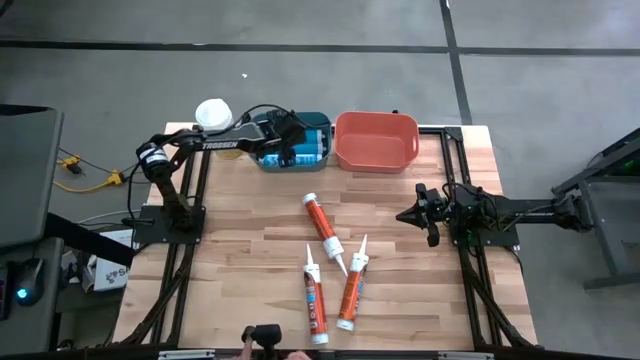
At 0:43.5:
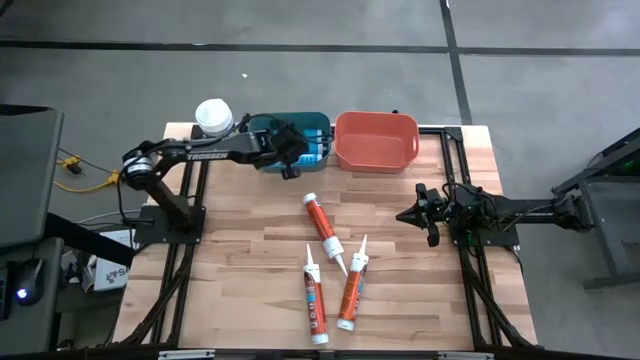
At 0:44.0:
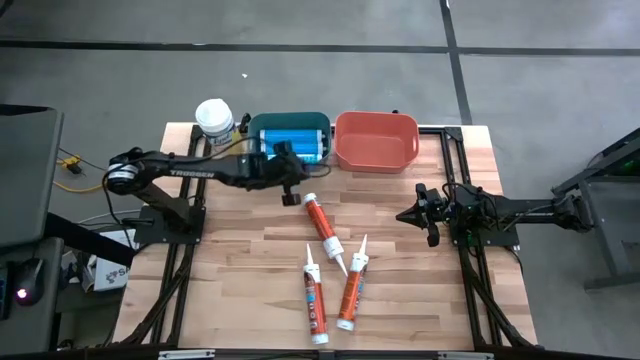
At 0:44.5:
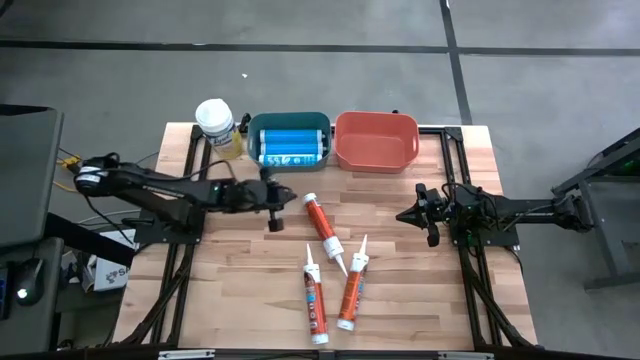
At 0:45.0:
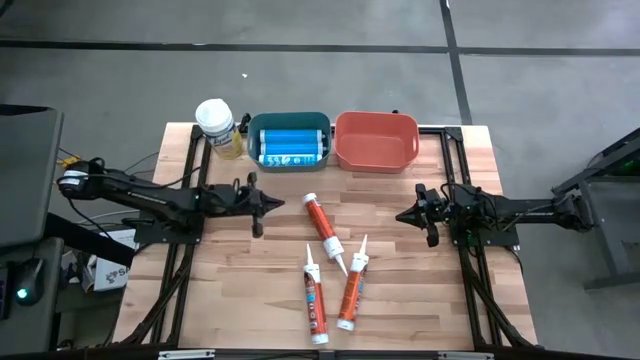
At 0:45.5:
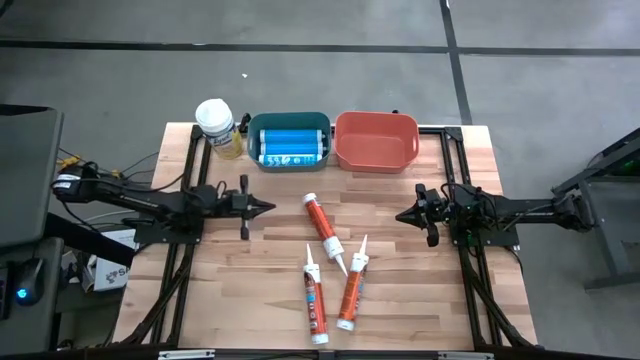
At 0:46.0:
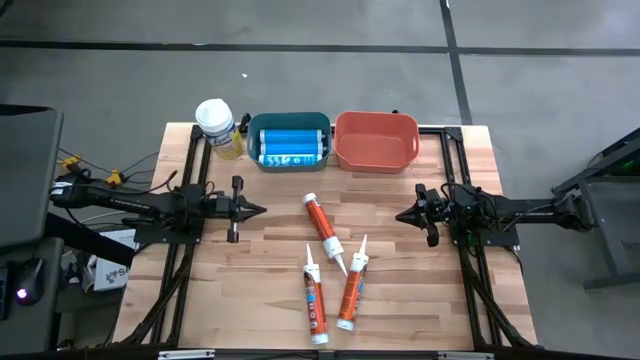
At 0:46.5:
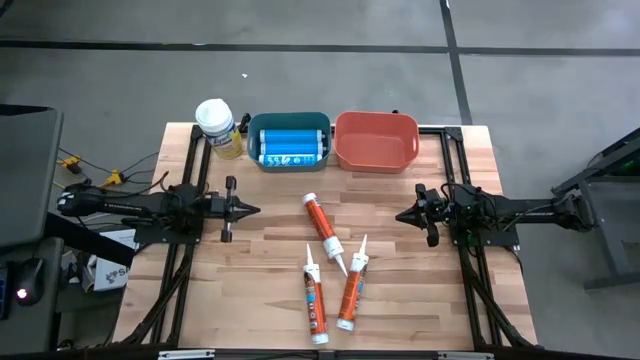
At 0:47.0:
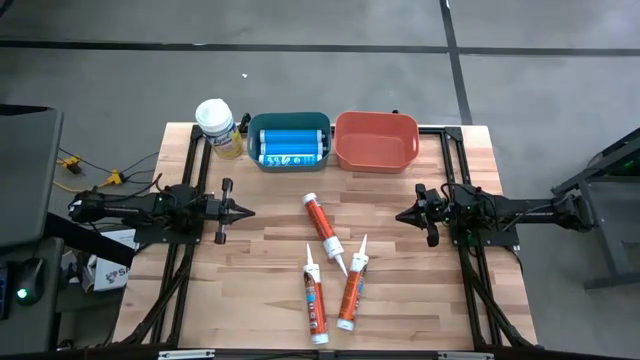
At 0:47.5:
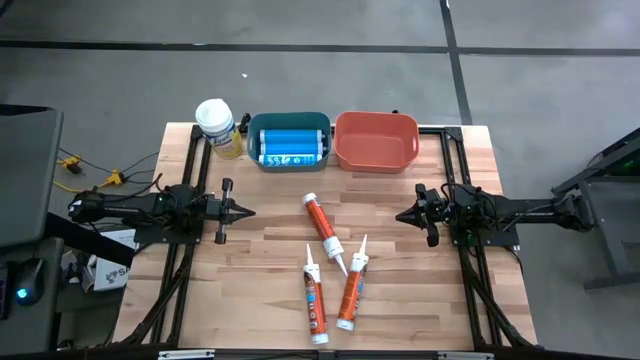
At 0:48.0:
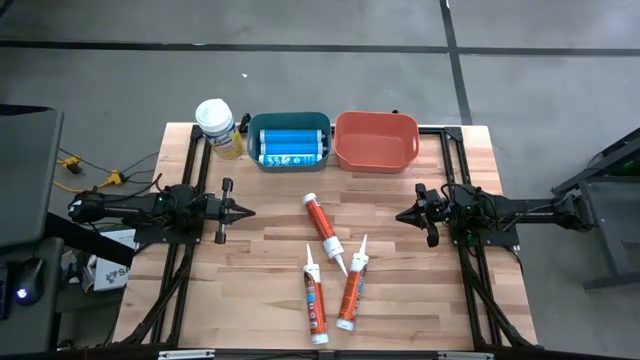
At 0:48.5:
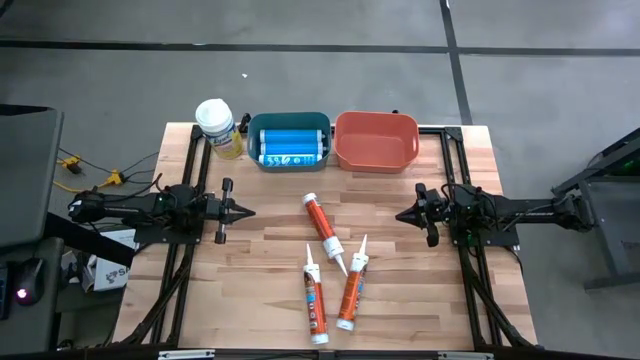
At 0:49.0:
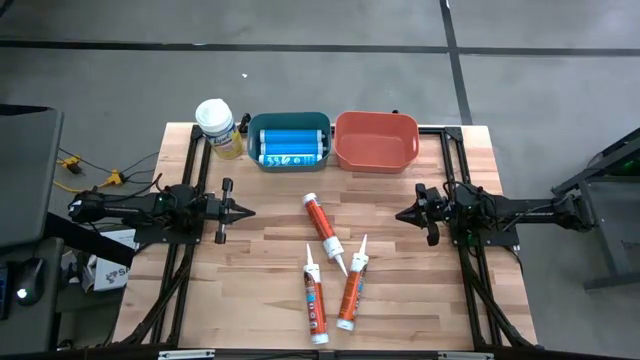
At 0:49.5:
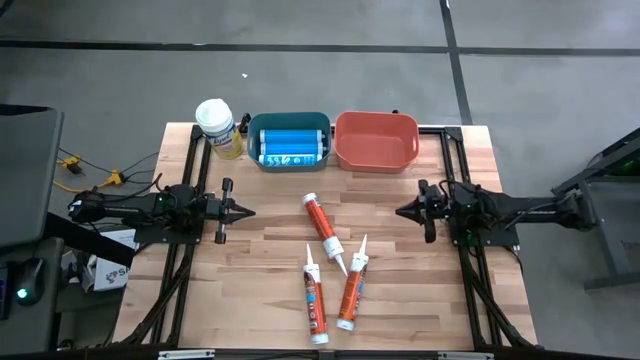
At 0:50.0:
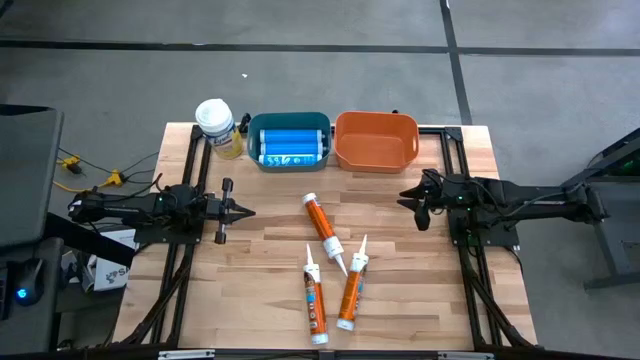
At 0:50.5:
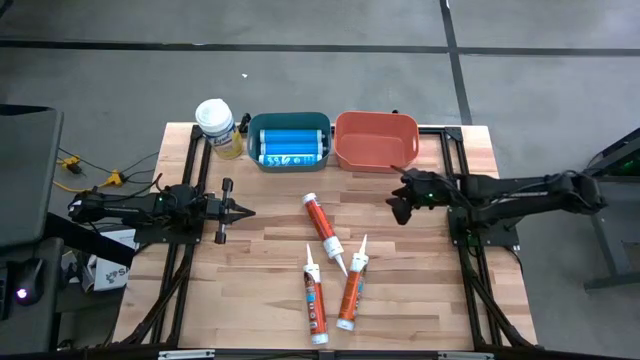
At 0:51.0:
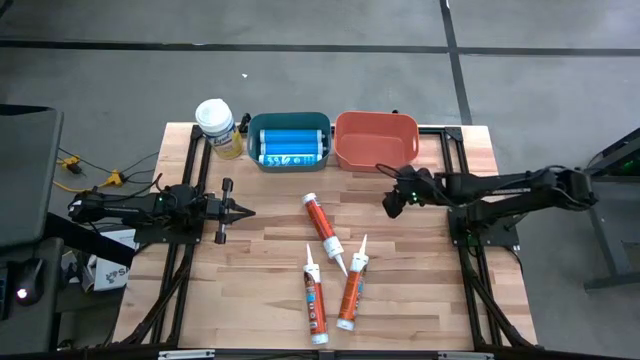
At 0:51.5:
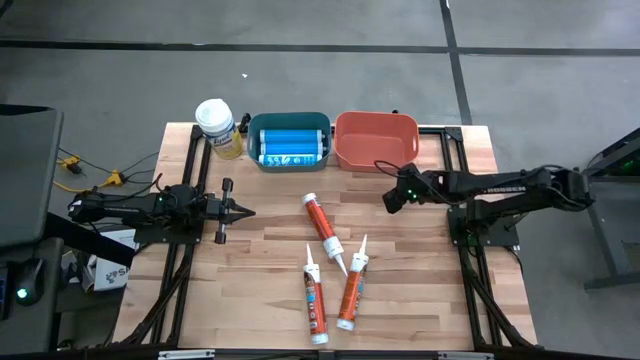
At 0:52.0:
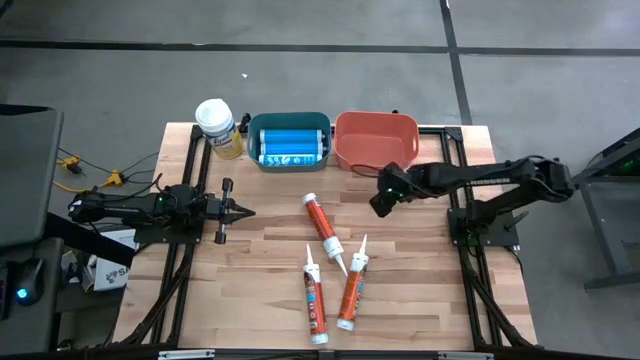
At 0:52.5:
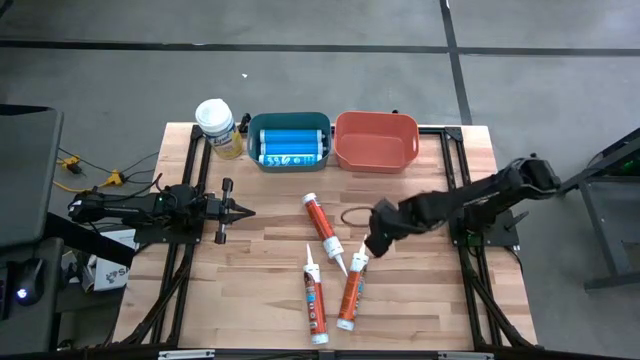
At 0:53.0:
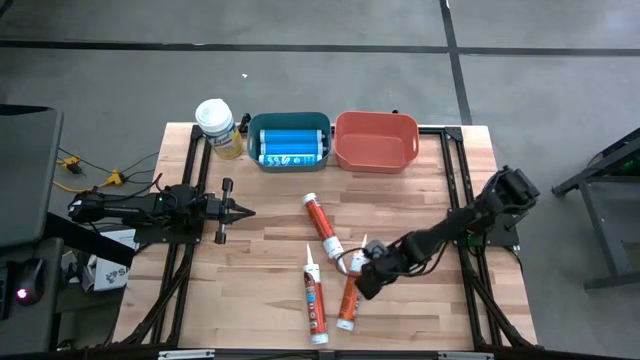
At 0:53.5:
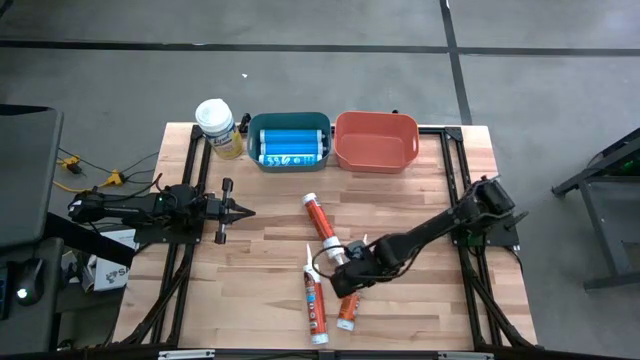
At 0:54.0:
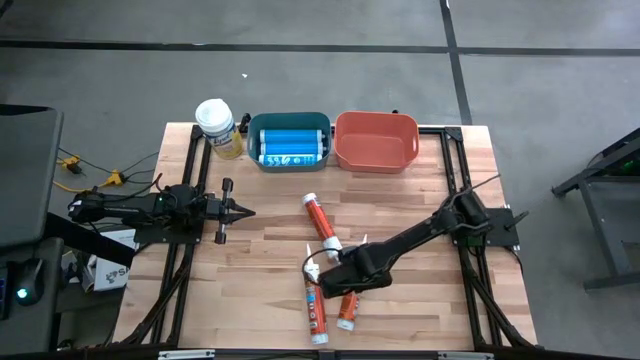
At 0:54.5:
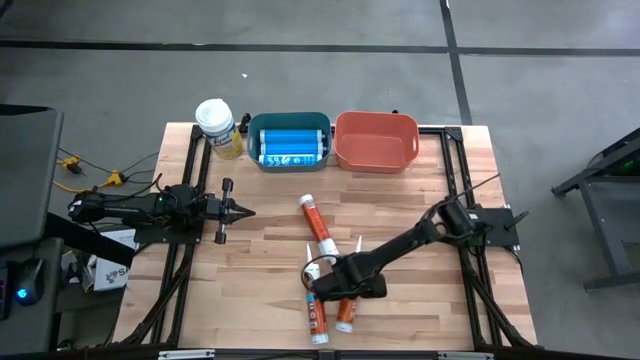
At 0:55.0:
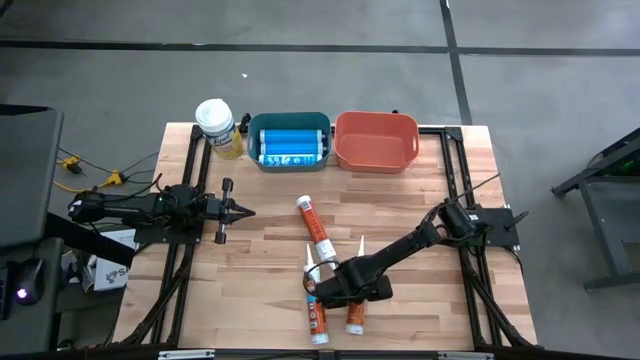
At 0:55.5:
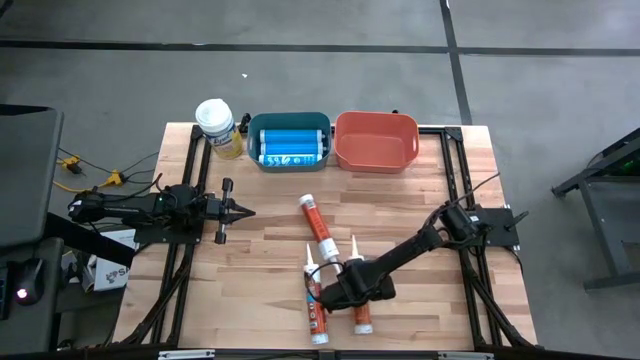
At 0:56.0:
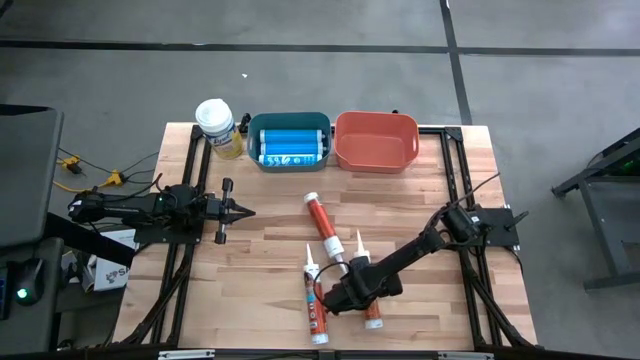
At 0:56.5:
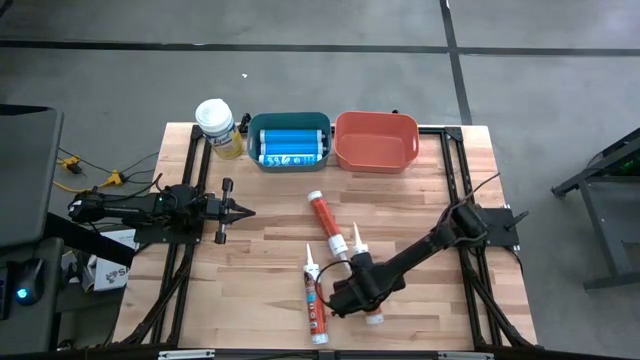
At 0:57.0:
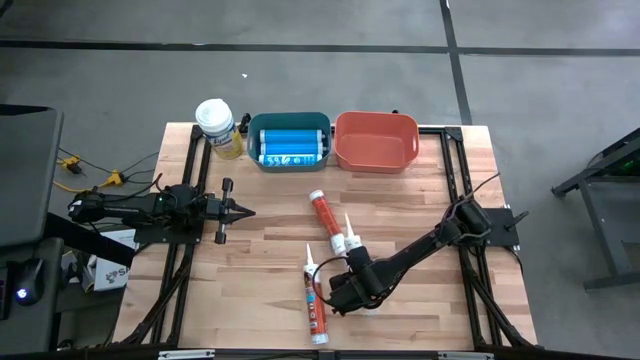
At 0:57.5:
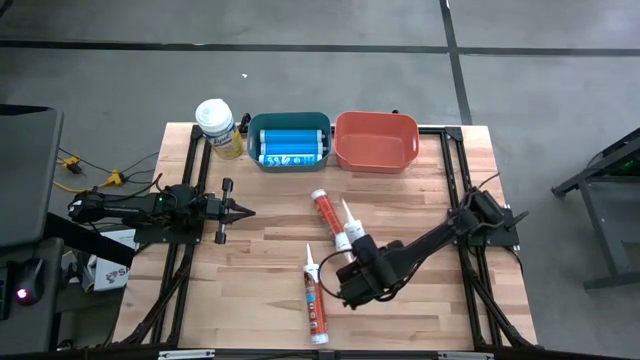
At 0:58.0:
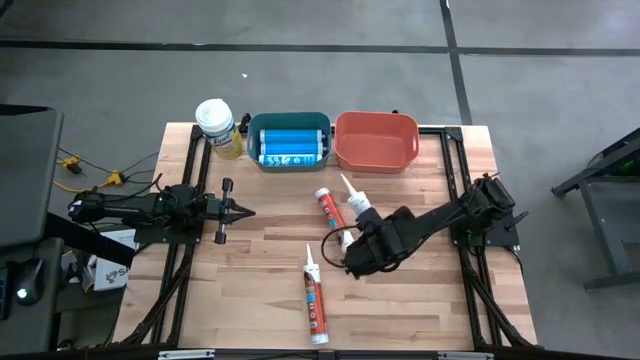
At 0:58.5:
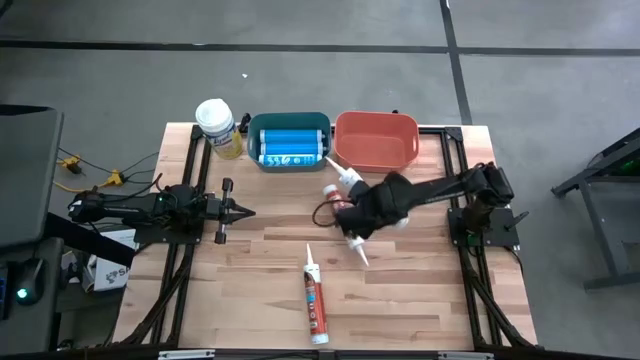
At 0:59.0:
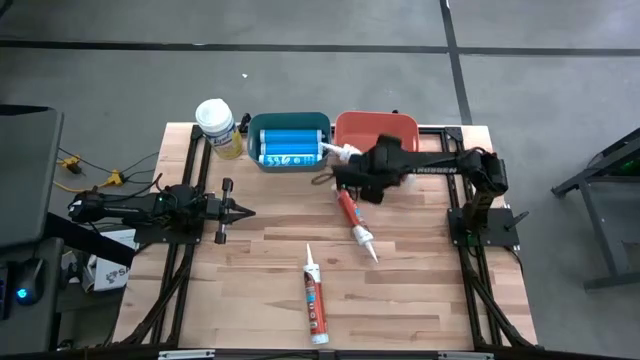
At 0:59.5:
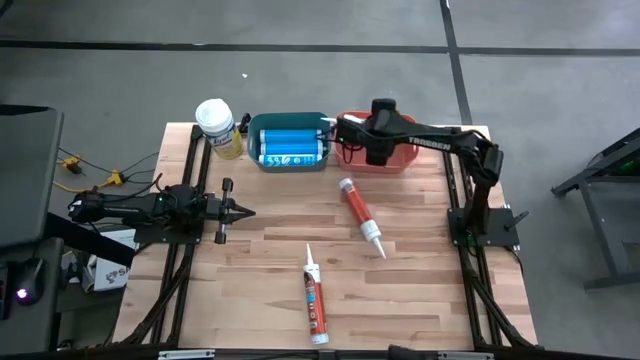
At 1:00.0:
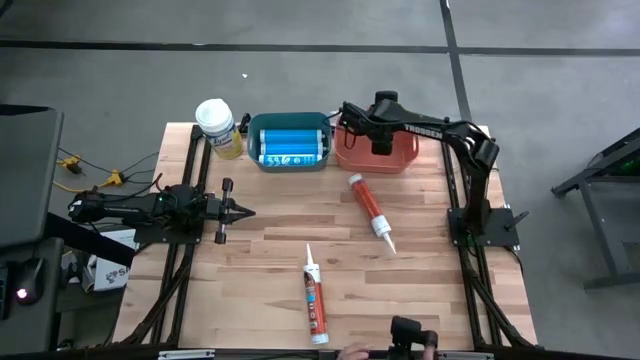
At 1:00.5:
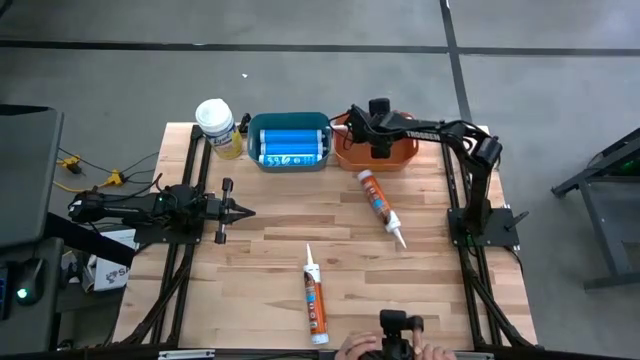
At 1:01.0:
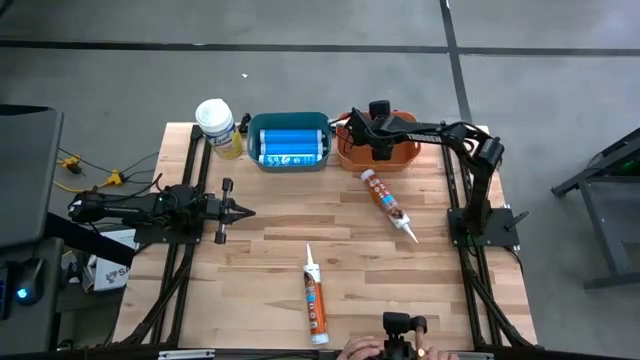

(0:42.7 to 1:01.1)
Task: Pick & place silicon tubes, Sealant and Lysol wipes
Put the right orange sealant into the orange bin

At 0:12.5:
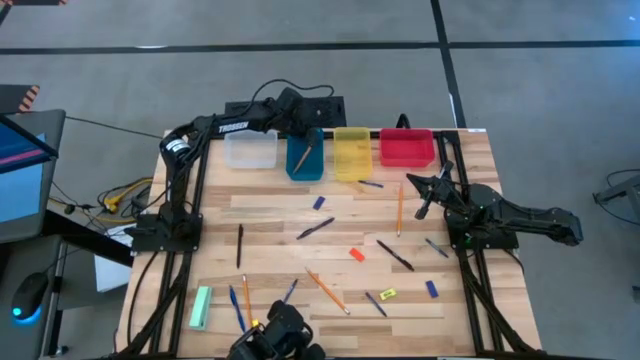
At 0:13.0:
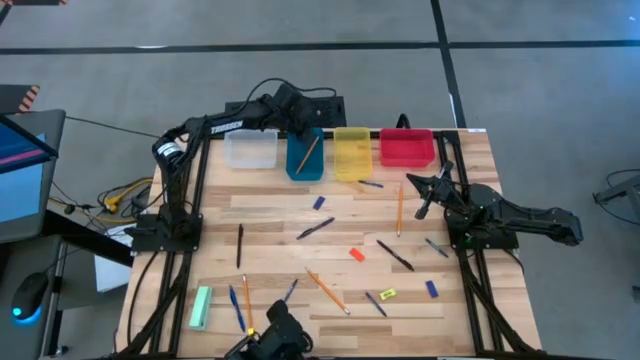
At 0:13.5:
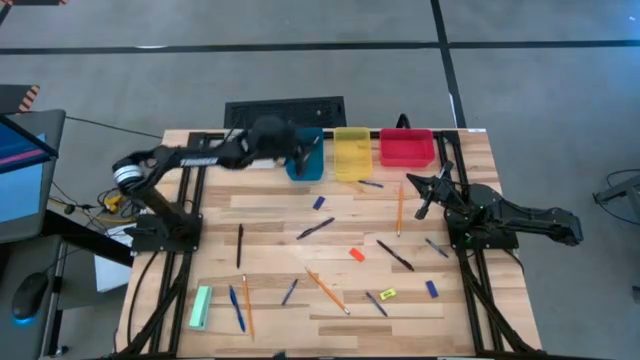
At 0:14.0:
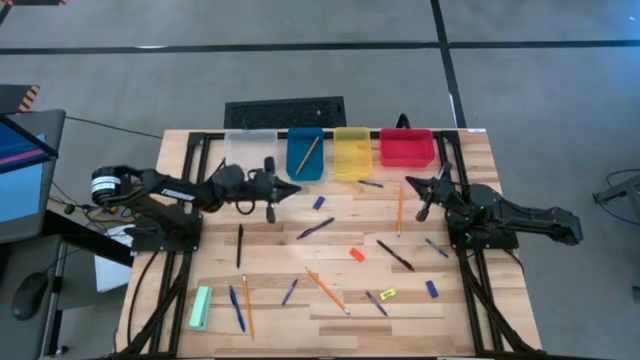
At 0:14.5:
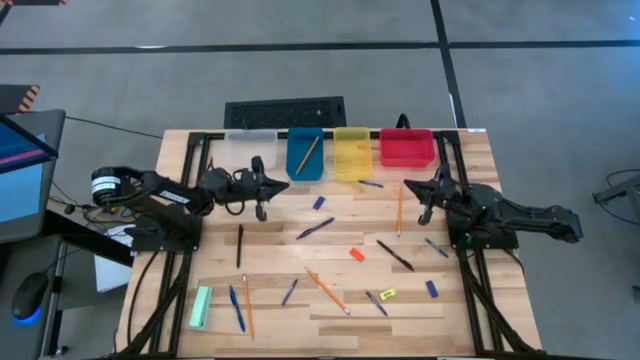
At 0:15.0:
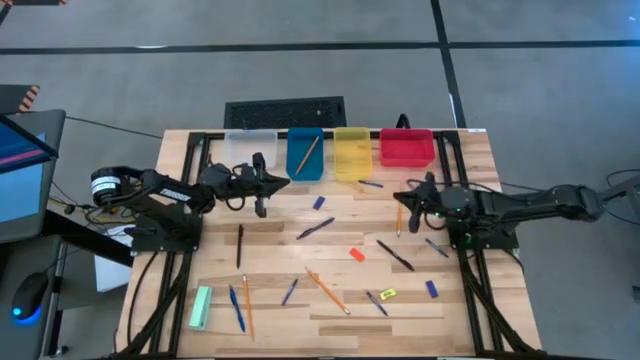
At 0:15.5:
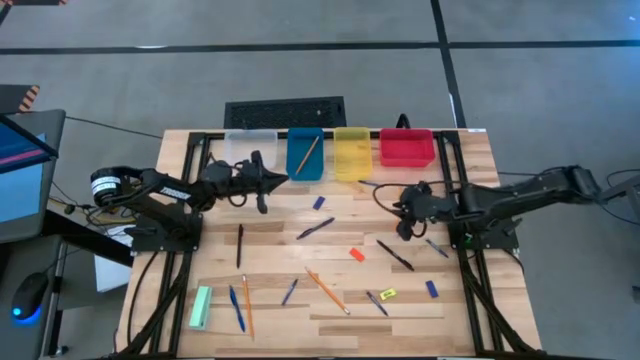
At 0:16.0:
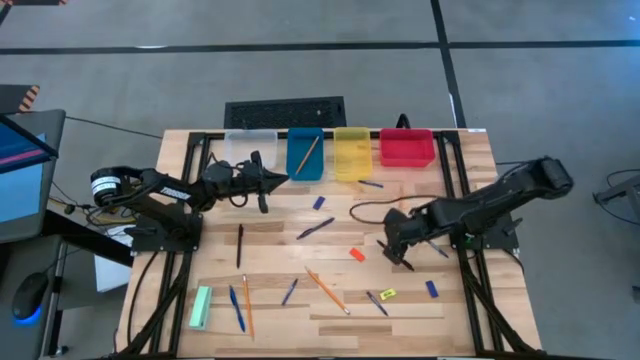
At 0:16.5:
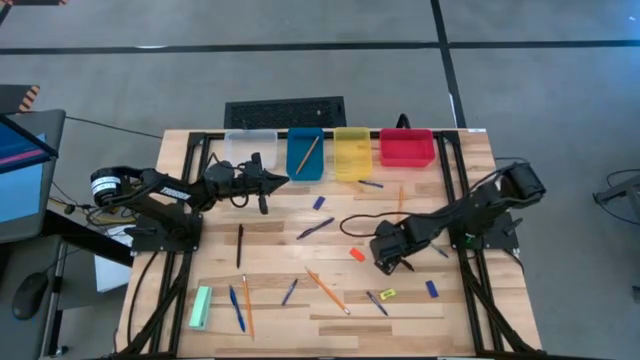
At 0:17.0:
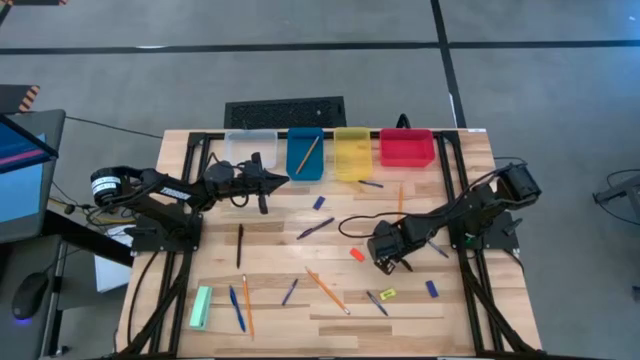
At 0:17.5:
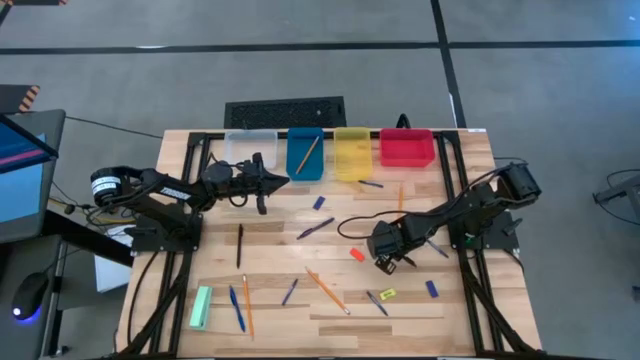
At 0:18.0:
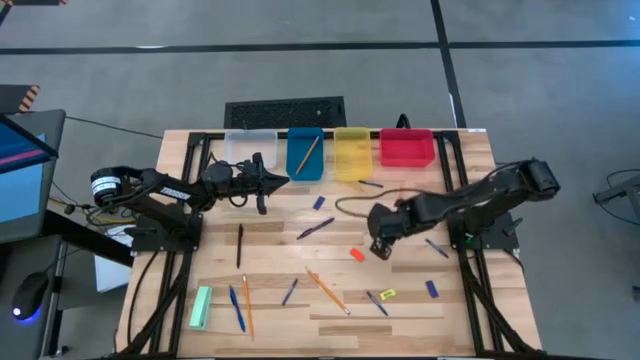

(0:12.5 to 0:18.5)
Task: Sort crayons/erasers/pens/pencils in bins
Put the black pen into the red bin
